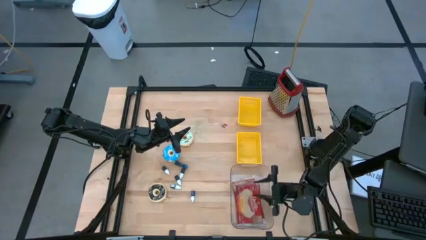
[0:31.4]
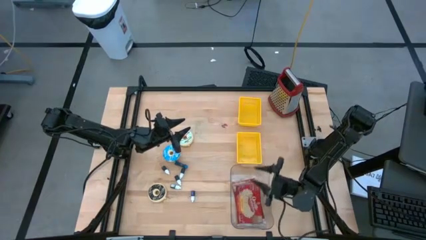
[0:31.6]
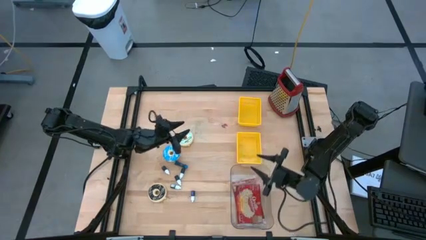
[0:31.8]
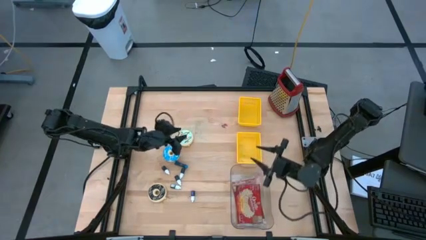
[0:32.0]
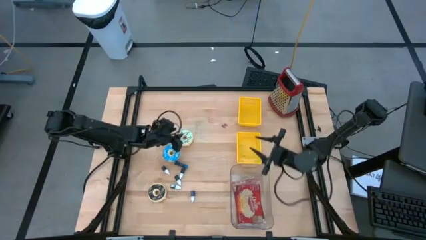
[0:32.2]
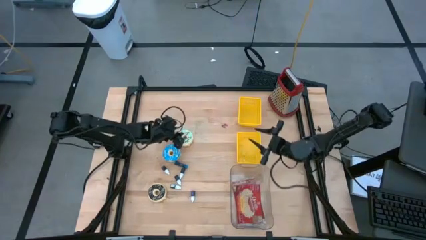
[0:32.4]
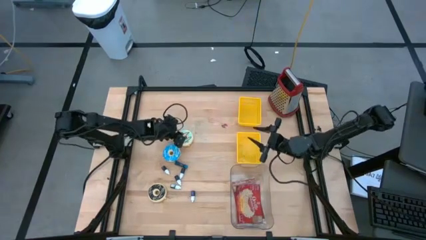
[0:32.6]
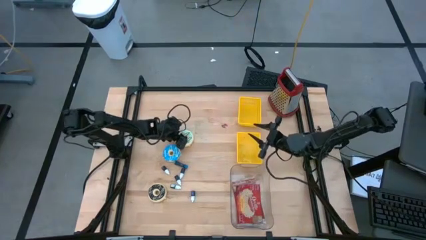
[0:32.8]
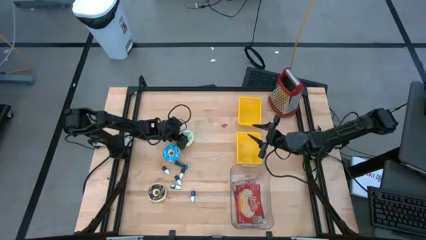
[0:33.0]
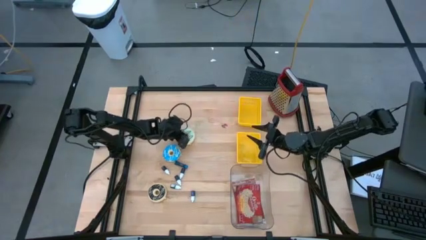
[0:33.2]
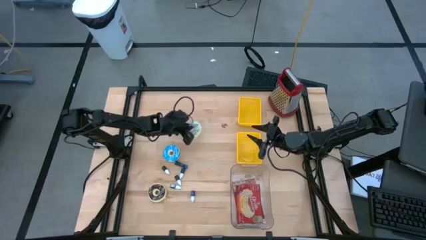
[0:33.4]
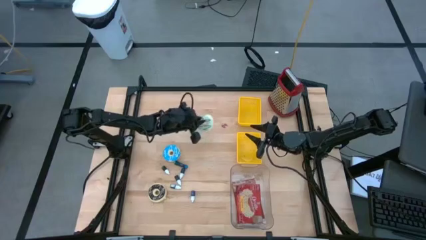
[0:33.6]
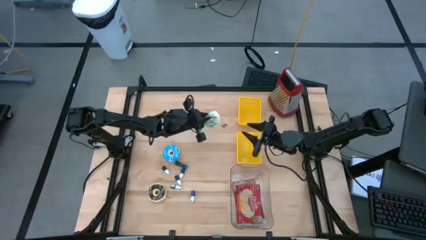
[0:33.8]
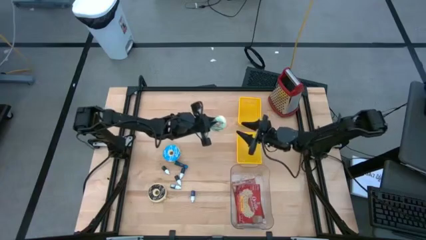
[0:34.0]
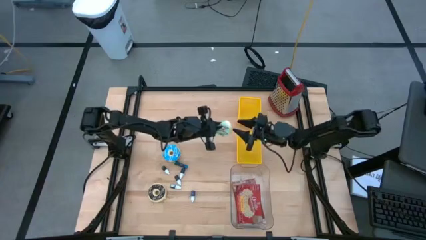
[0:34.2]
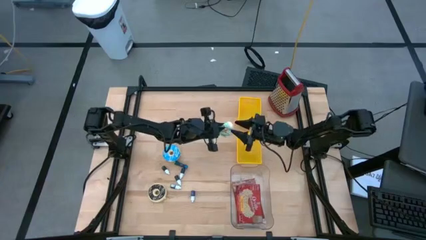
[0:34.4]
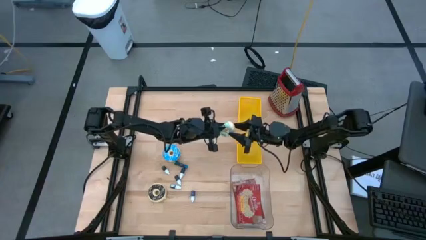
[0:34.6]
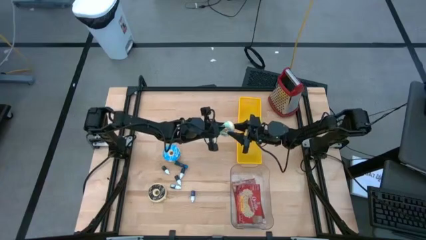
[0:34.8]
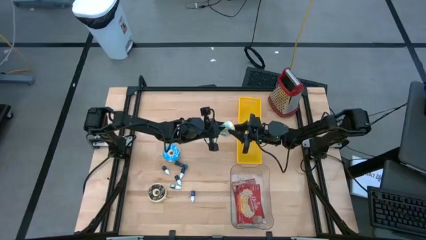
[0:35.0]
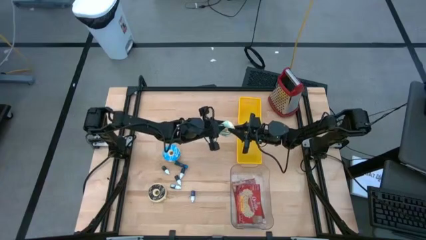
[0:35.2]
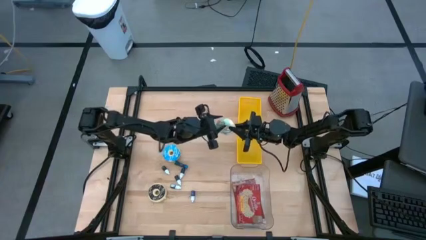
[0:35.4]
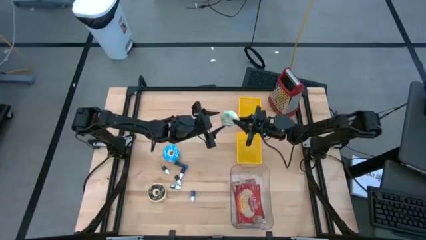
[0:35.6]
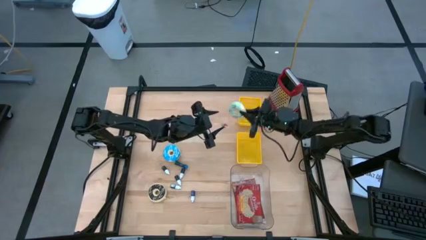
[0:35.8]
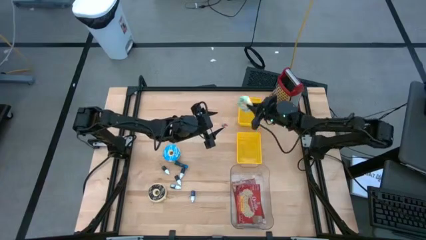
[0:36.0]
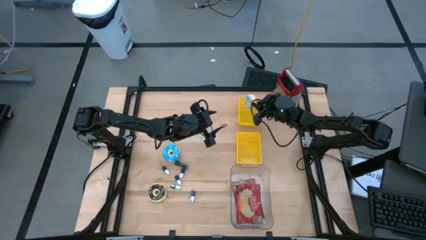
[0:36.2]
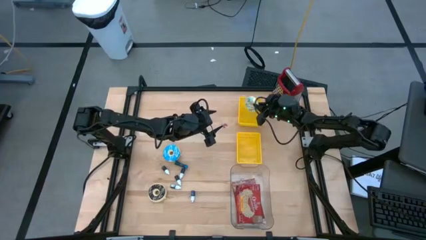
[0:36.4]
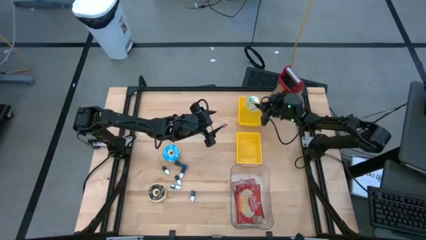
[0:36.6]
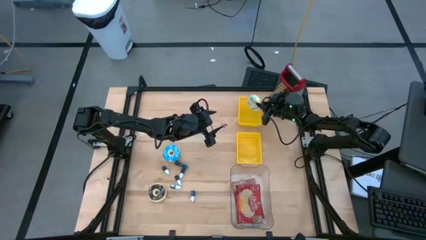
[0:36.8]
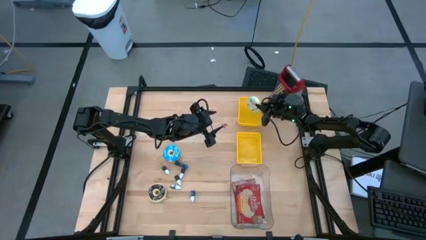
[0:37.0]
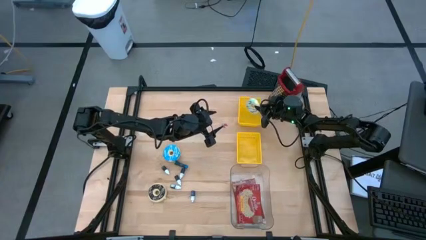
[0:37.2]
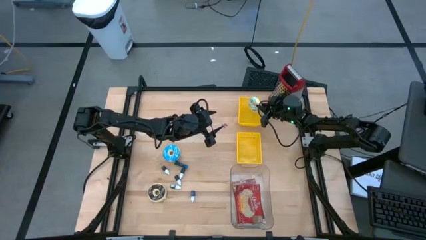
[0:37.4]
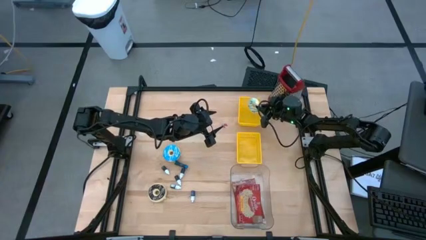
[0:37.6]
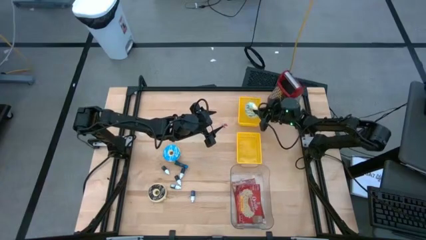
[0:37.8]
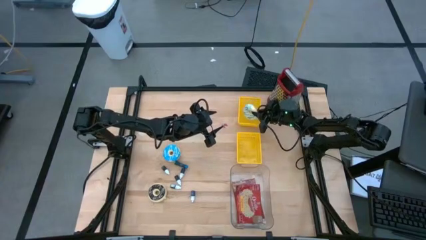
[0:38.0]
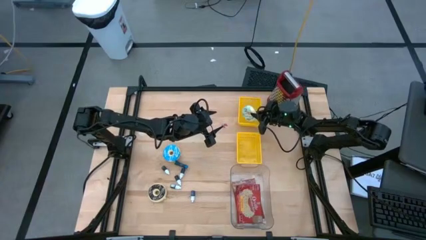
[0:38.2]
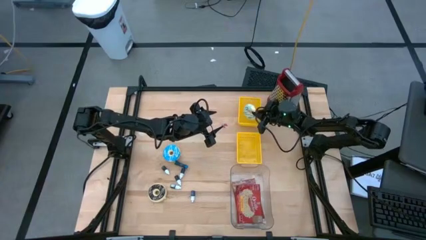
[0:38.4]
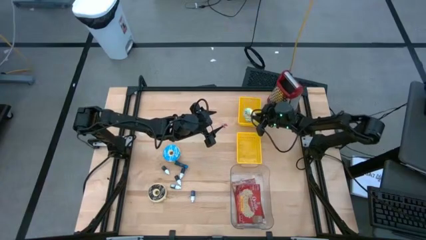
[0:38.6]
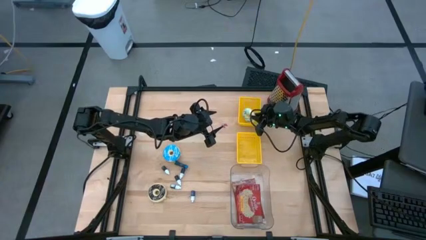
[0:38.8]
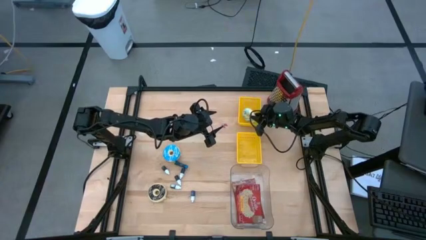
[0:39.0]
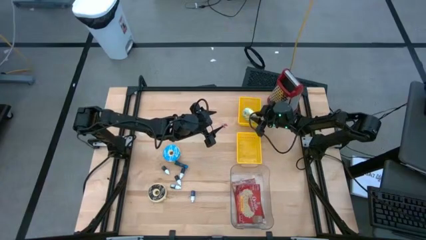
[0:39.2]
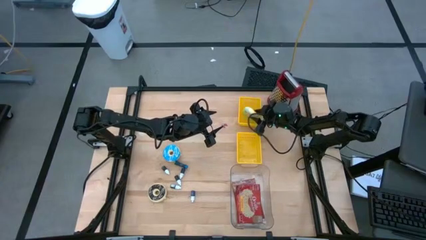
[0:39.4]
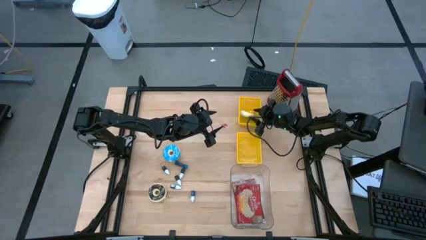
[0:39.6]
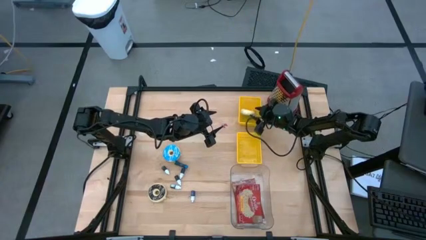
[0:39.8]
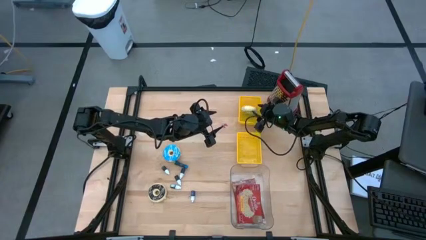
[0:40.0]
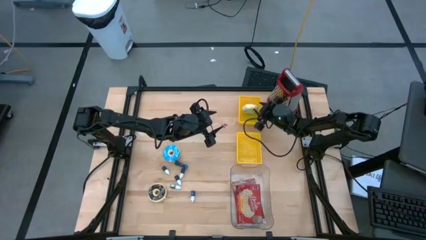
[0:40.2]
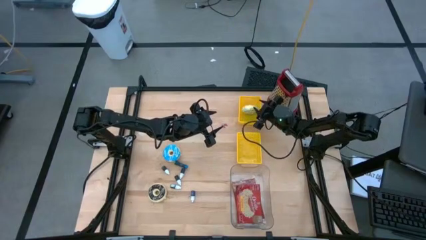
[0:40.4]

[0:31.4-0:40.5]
Put the light blue donut into the top yellow bin

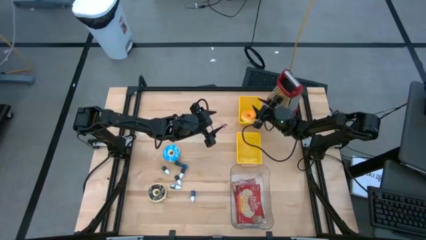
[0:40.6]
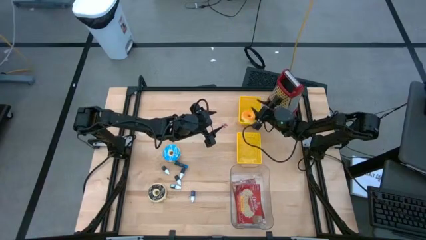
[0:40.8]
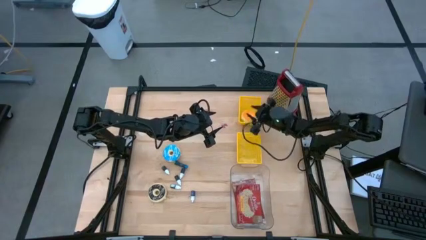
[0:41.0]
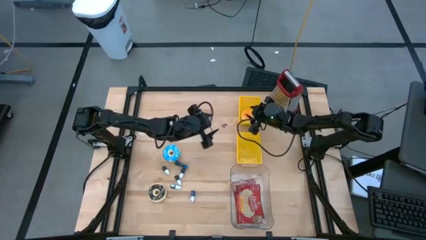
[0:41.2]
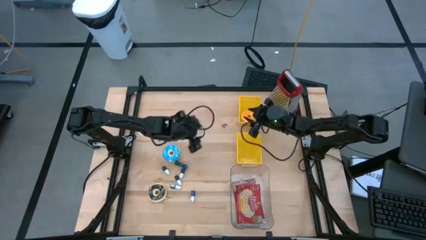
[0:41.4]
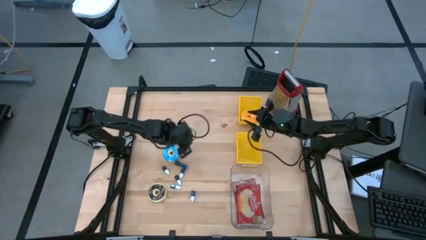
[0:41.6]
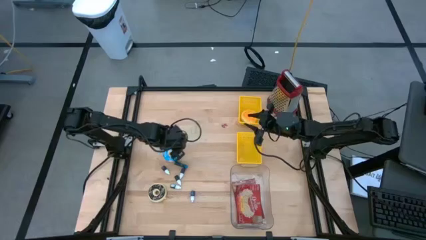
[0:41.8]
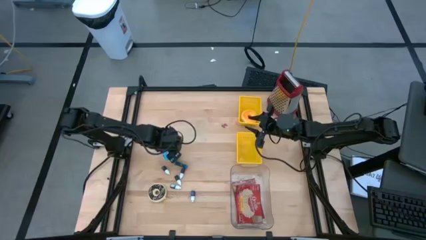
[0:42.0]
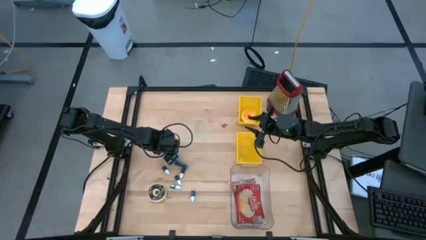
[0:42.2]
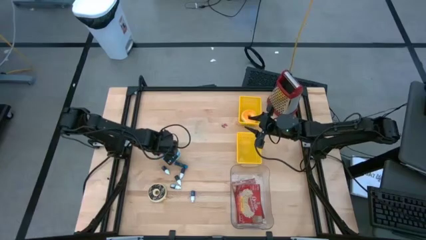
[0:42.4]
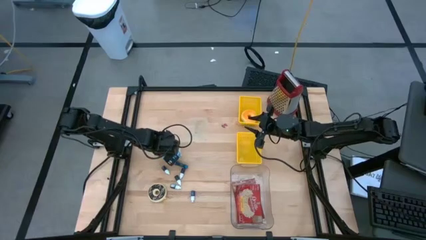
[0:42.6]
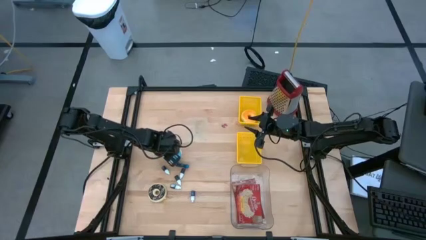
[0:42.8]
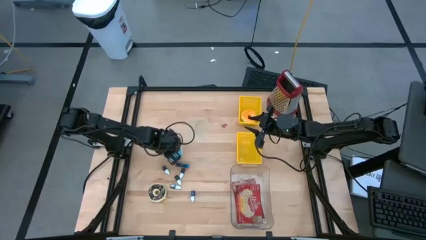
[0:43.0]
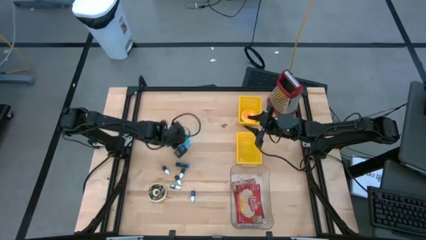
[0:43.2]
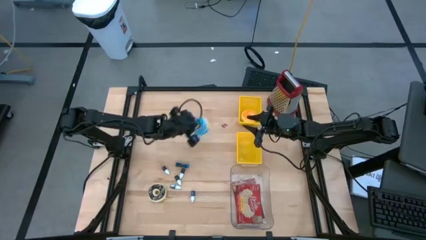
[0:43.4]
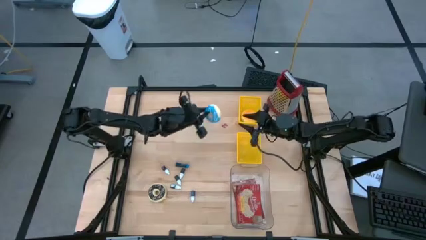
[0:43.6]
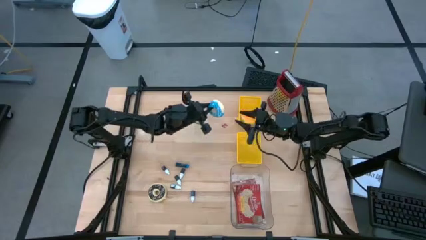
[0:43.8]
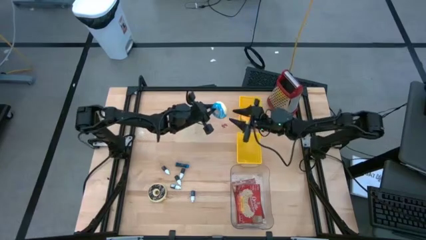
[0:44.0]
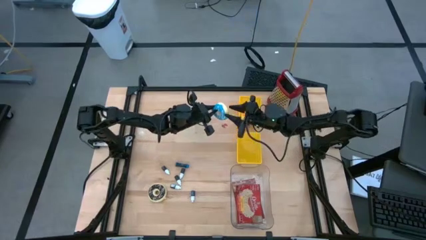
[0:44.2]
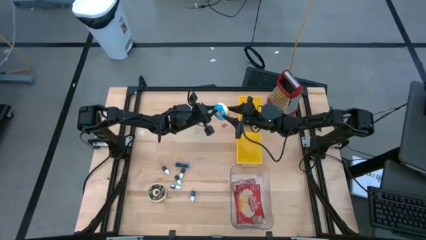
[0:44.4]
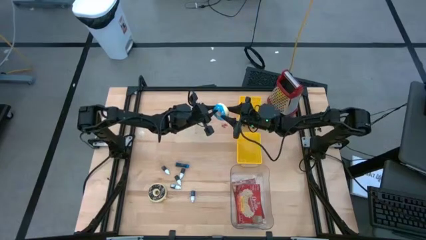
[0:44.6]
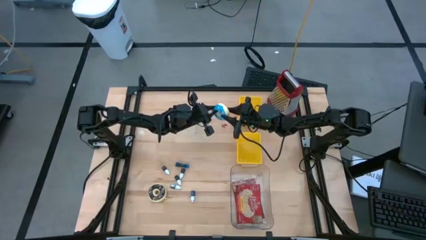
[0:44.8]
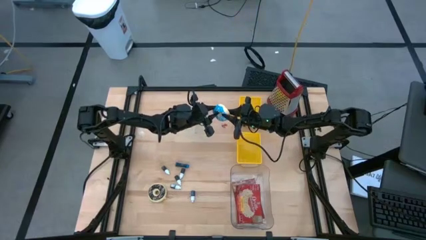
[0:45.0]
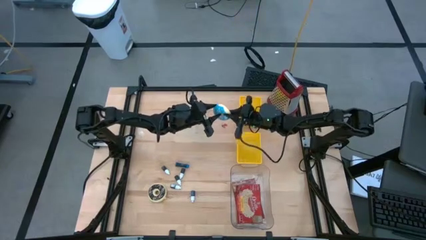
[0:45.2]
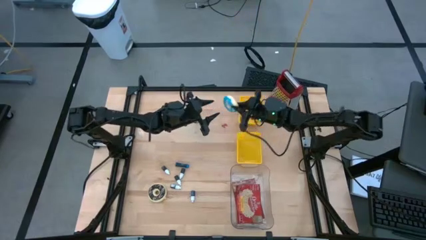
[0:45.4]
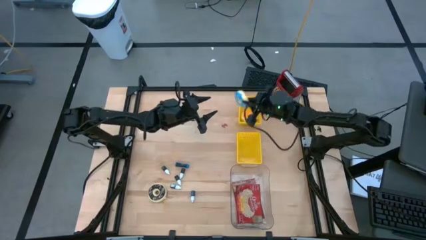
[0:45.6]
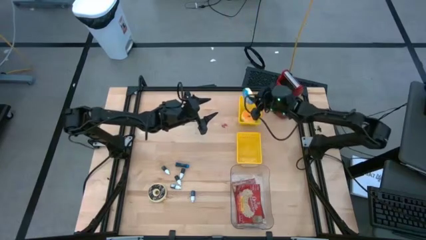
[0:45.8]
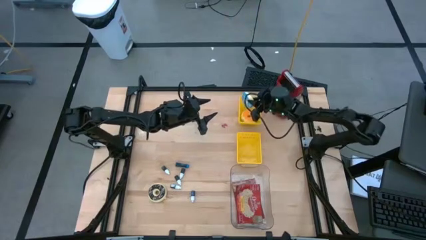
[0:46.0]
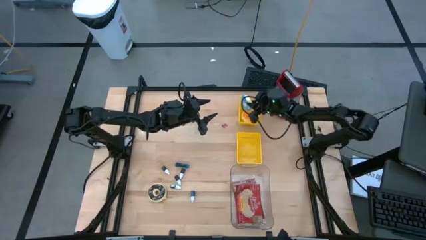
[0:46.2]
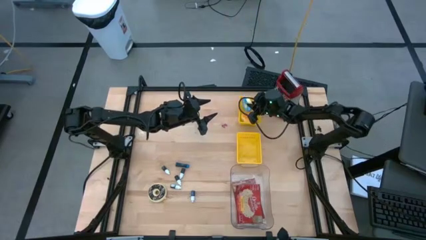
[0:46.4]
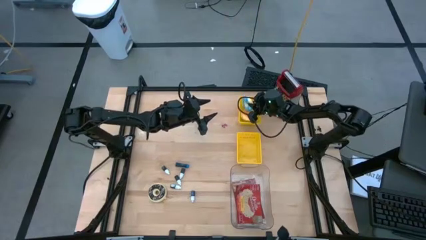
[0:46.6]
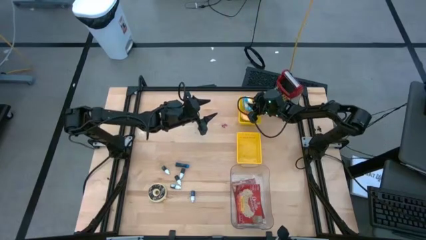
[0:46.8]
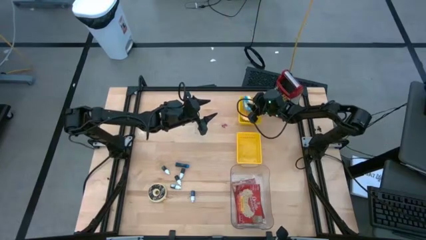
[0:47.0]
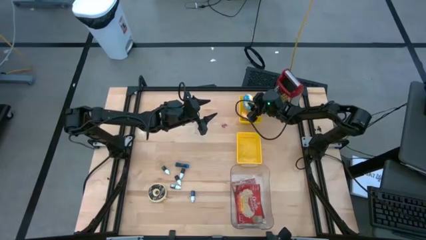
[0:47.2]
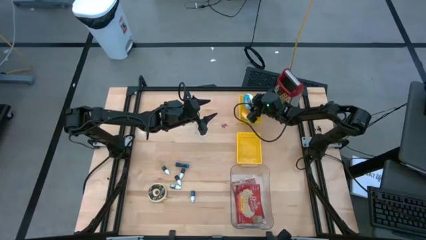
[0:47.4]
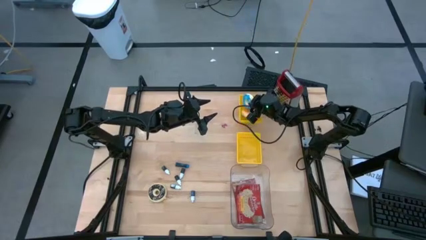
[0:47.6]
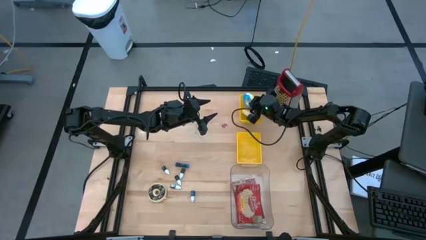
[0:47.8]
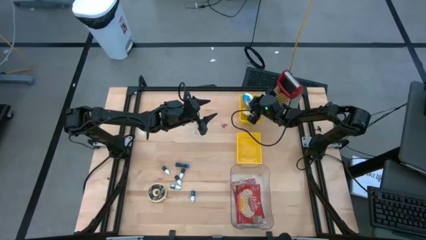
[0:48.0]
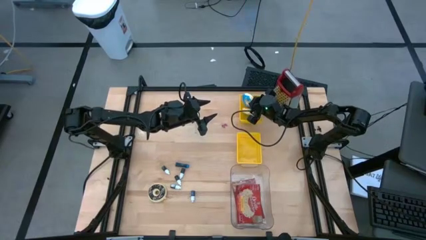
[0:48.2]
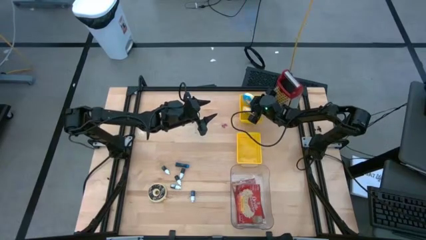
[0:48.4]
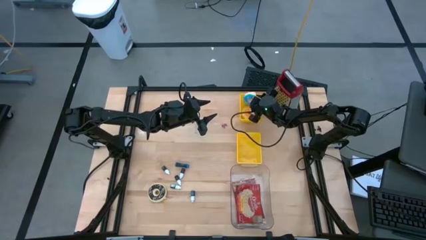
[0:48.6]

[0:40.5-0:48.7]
Put the blue donut into the top yellow bin
